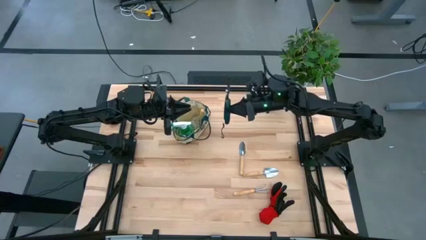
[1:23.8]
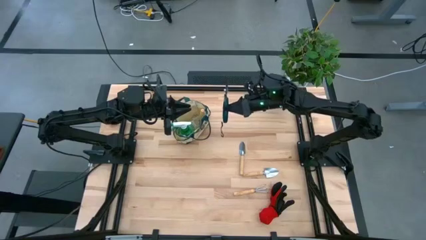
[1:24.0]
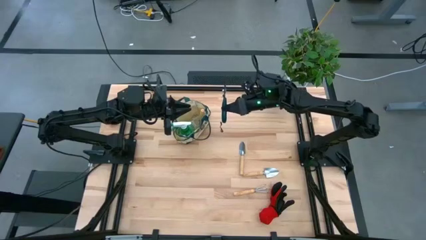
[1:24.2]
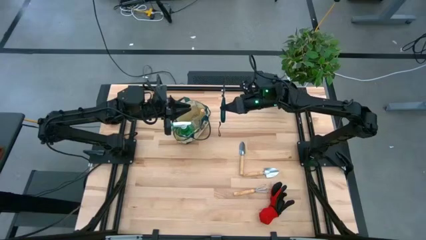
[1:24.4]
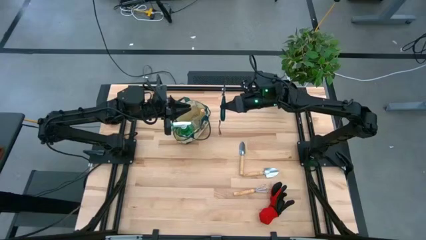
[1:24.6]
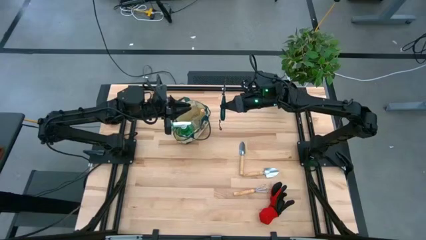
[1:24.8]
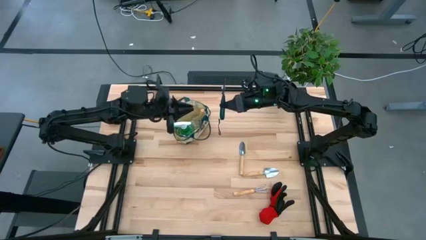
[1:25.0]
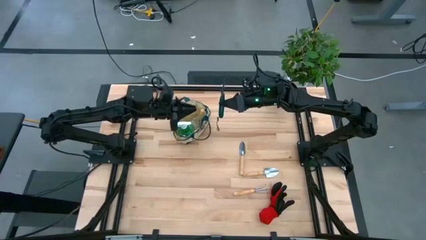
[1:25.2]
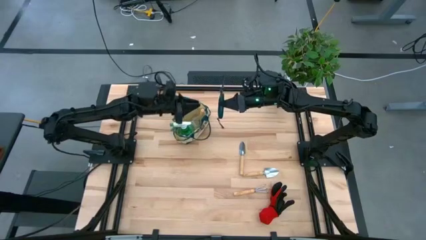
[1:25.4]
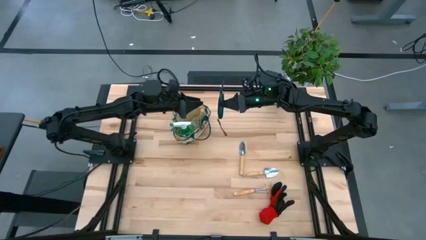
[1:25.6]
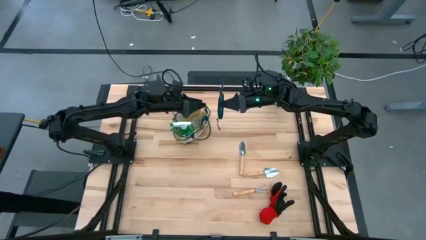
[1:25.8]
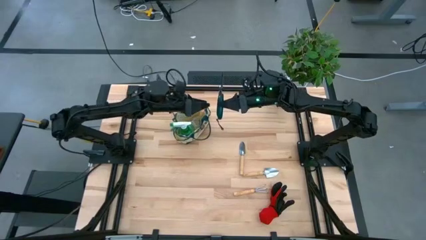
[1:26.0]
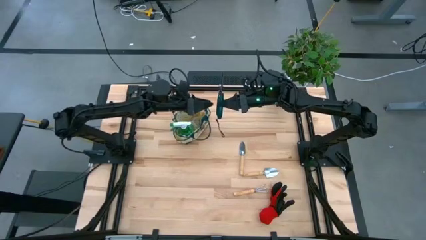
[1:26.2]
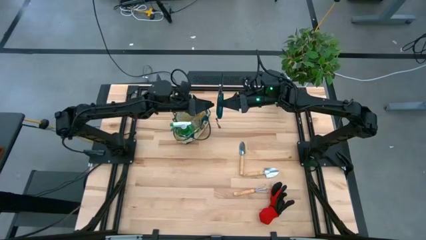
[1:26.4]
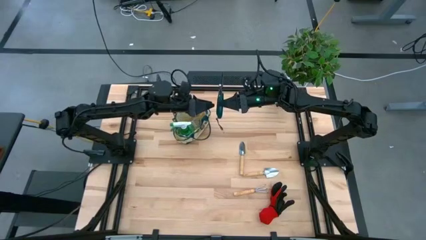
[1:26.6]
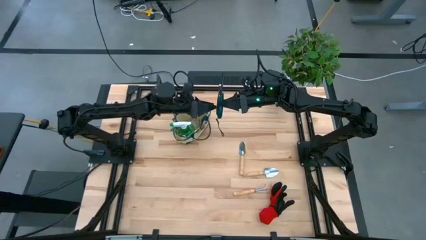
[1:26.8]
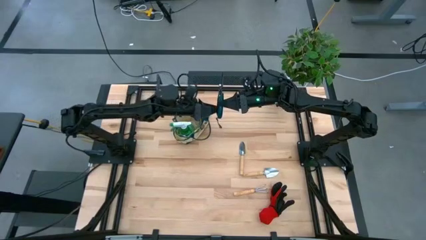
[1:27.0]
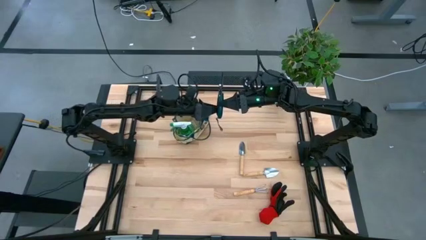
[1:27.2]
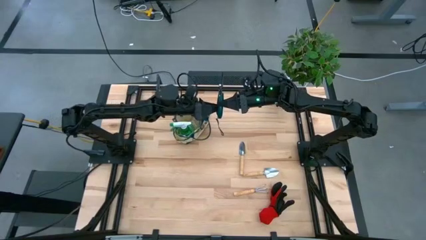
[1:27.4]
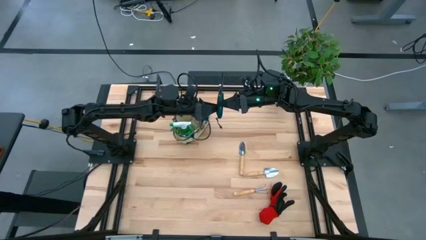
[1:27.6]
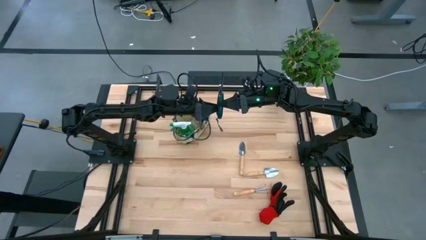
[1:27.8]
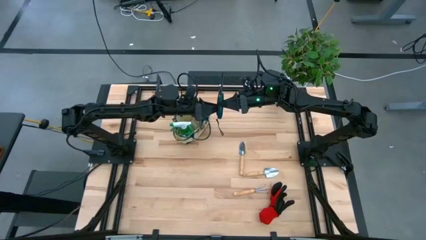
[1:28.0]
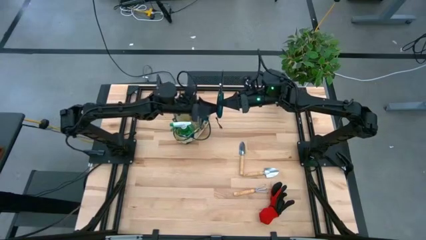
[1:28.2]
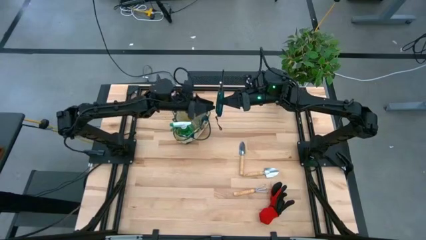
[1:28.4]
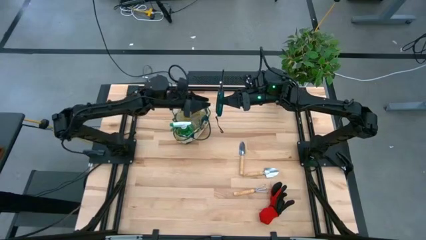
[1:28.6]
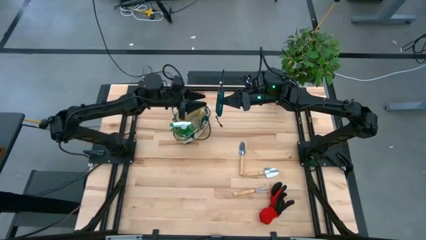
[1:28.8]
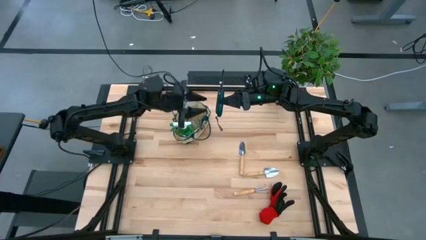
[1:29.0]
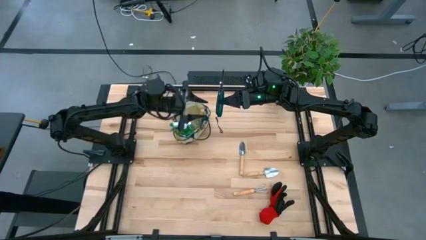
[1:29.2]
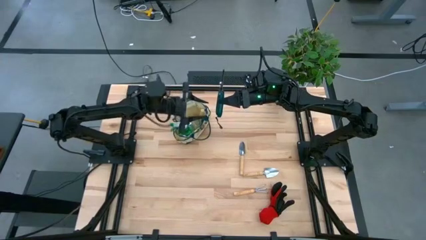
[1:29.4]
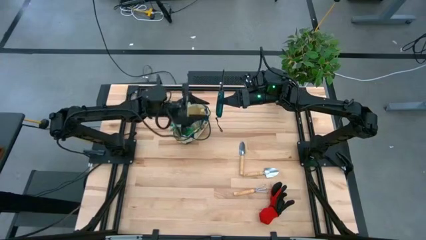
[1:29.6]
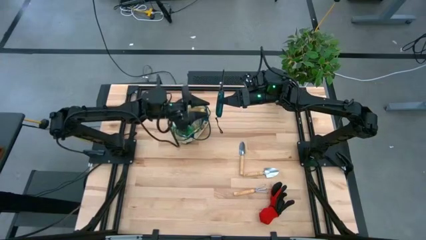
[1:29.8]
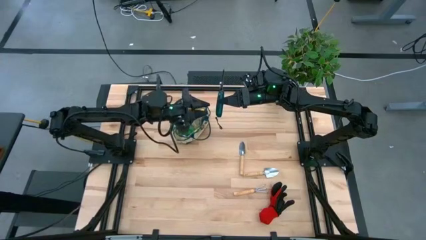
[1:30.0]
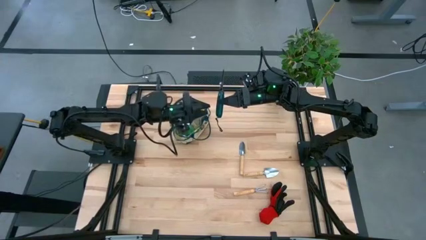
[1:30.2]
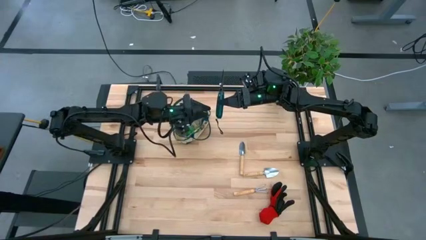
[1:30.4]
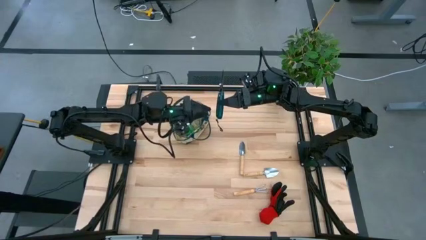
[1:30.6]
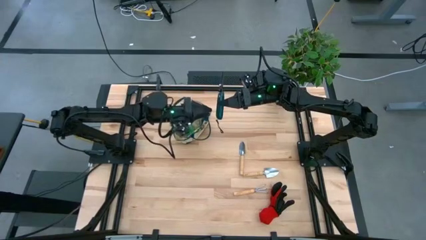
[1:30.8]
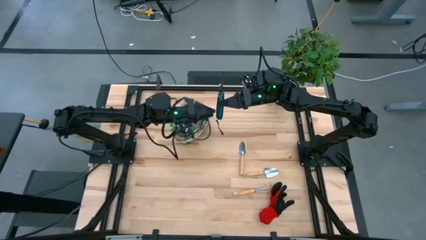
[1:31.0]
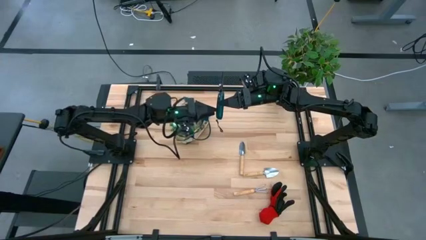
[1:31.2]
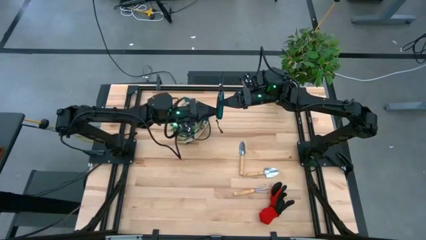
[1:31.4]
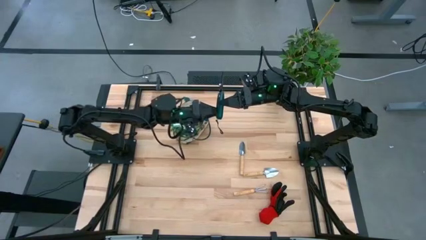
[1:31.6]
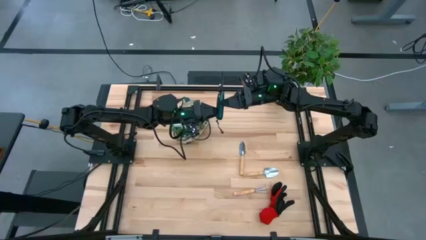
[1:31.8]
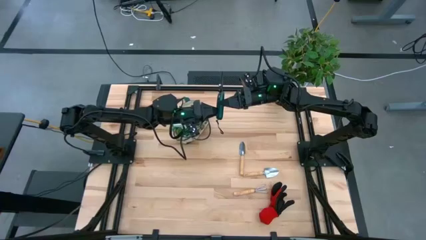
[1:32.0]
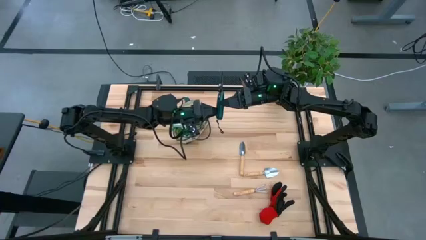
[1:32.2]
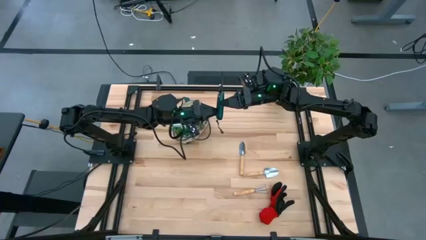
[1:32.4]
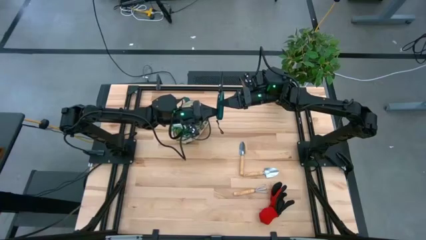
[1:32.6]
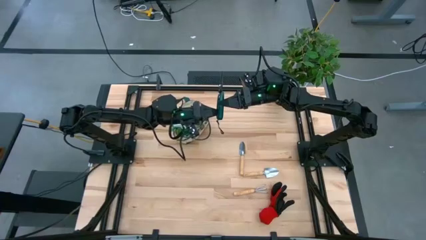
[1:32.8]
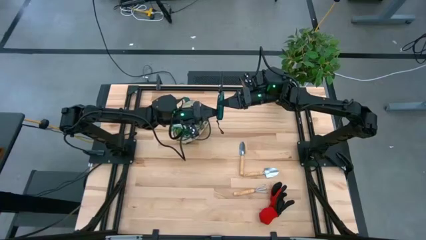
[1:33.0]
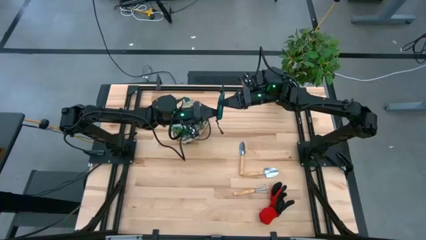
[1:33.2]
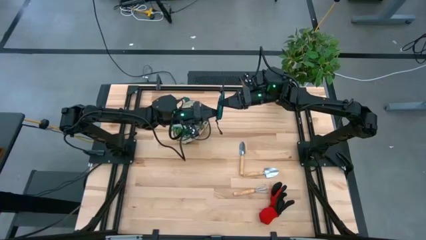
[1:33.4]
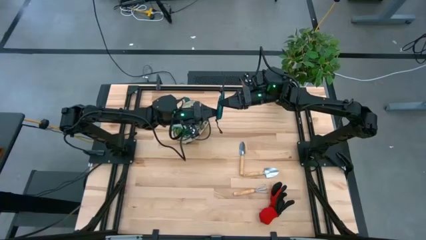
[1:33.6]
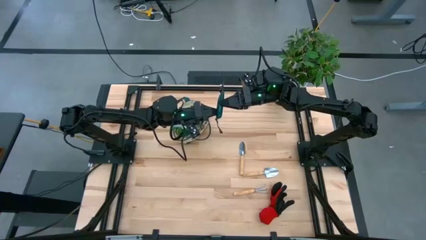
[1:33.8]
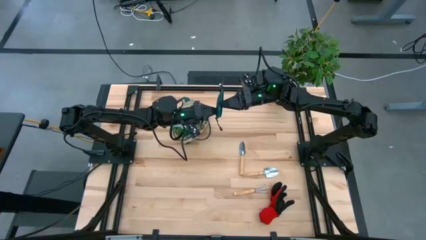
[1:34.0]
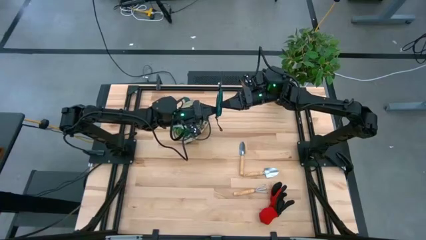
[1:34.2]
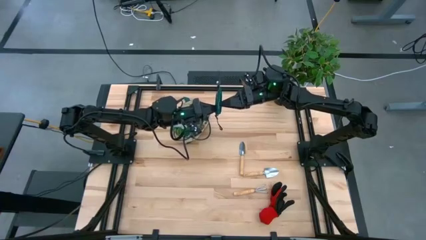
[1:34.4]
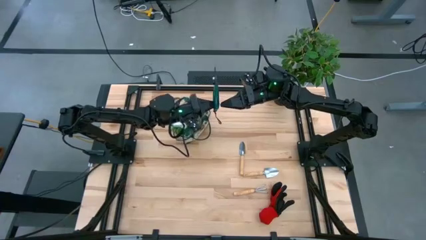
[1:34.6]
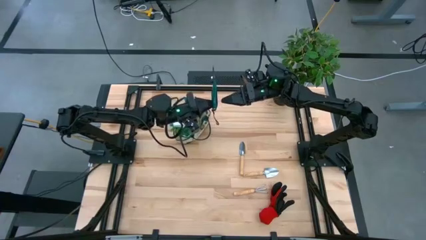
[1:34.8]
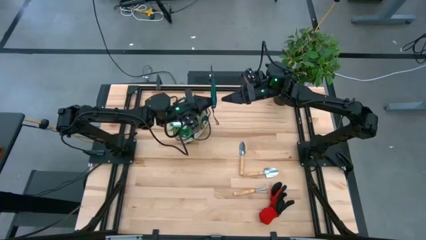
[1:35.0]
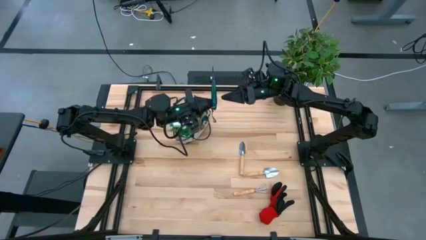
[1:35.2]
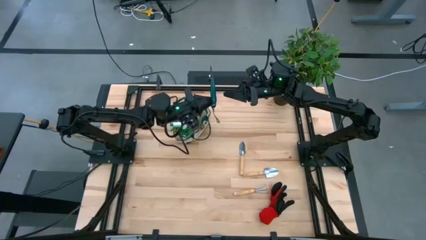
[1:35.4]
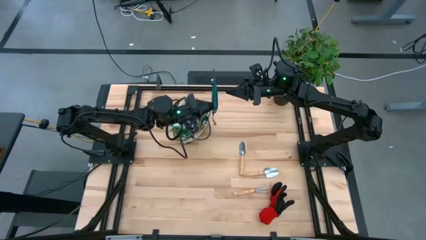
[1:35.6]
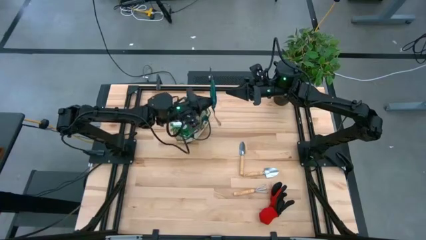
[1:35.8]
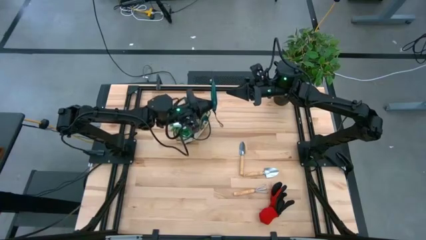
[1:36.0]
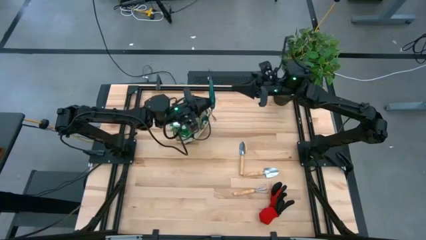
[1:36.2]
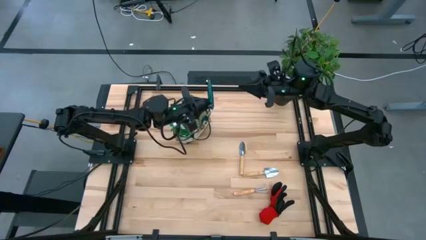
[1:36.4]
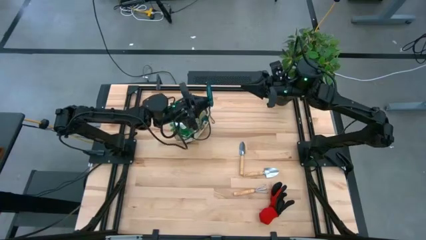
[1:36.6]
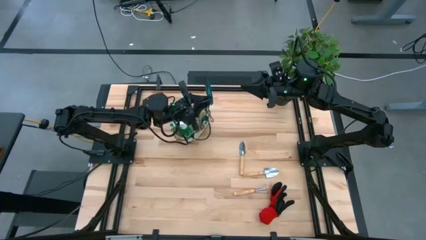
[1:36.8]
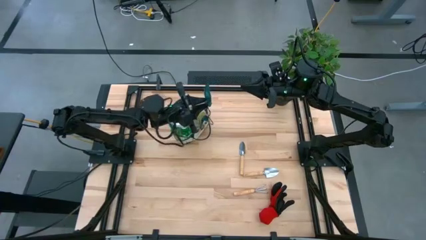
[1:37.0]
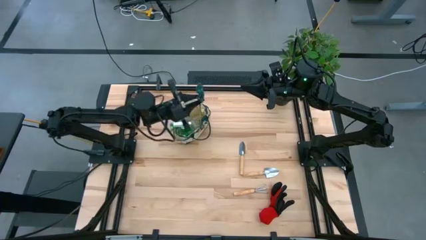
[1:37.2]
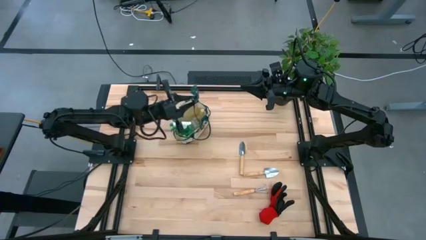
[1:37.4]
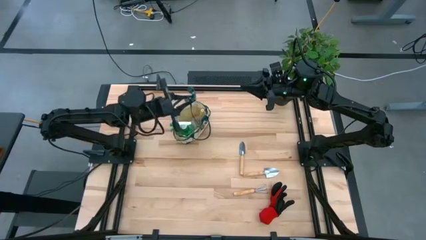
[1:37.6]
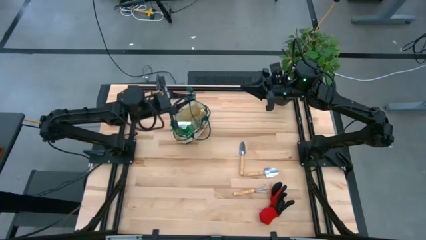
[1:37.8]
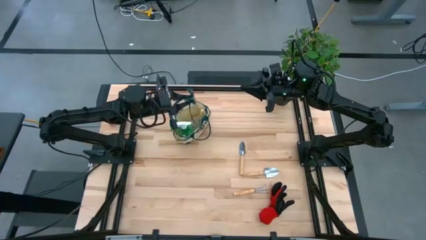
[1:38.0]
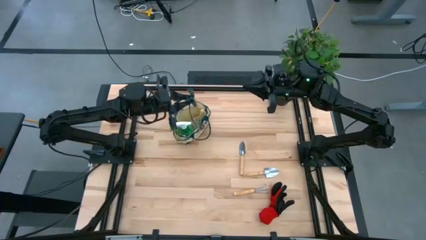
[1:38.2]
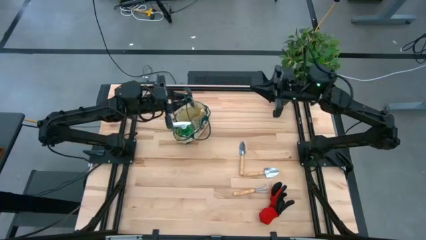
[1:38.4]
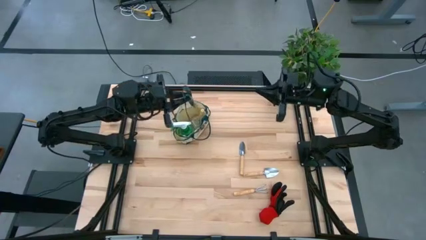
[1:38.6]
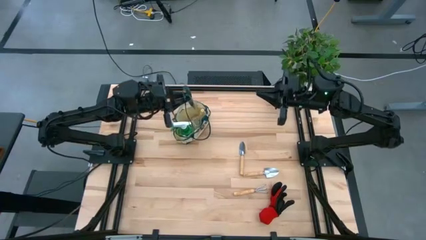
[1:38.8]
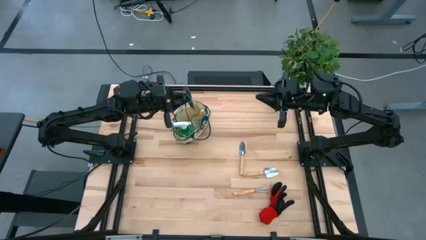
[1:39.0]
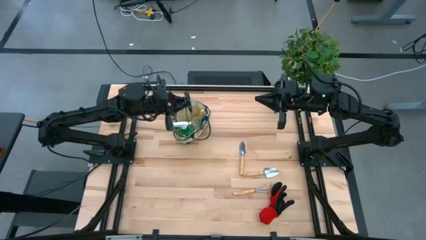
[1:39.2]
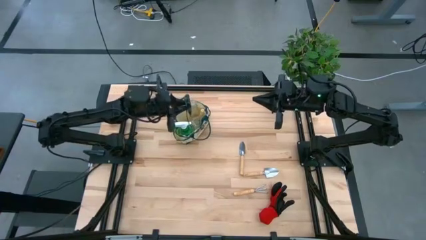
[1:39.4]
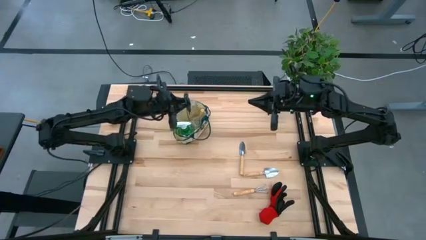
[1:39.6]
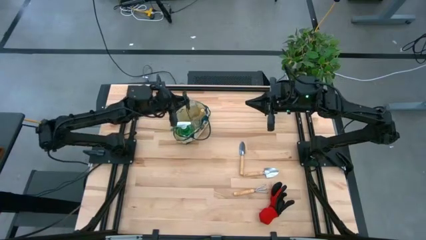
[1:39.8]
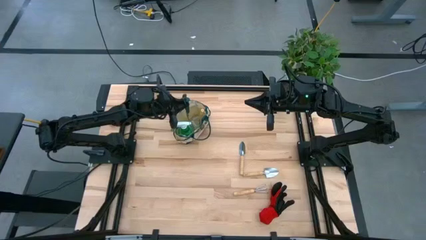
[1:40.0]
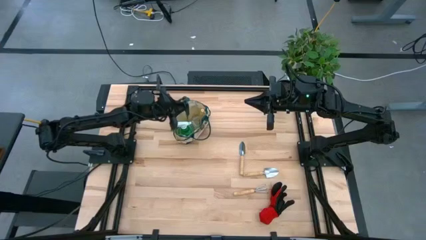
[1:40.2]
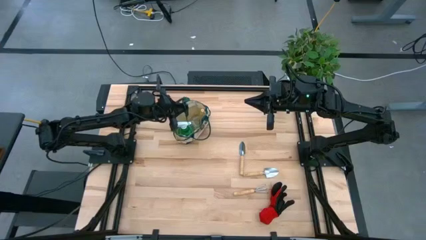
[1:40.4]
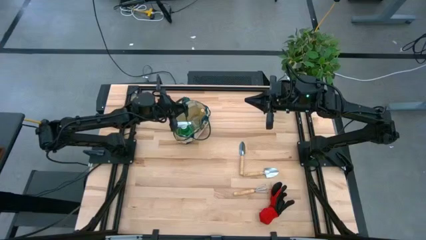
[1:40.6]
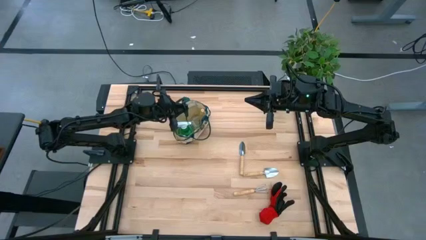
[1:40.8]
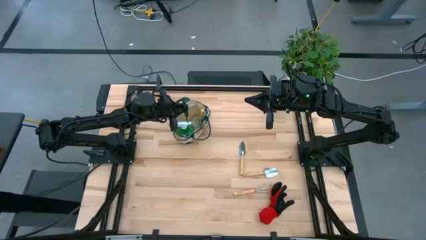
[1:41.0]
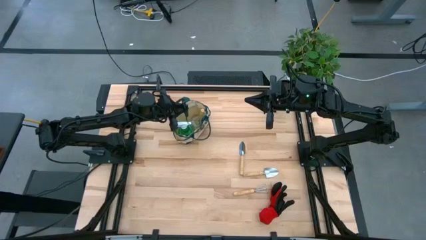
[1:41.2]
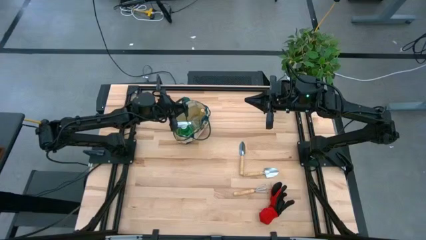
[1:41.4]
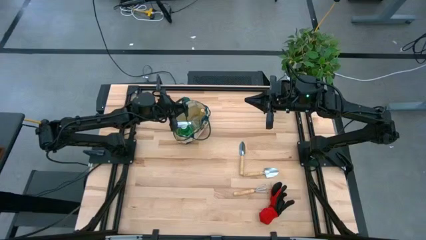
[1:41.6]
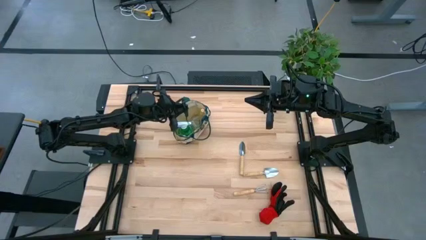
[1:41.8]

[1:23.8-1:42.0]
Task: Pick & Place Garden tools in Gardening bag
Put the green shear scissors into the gardening bag
